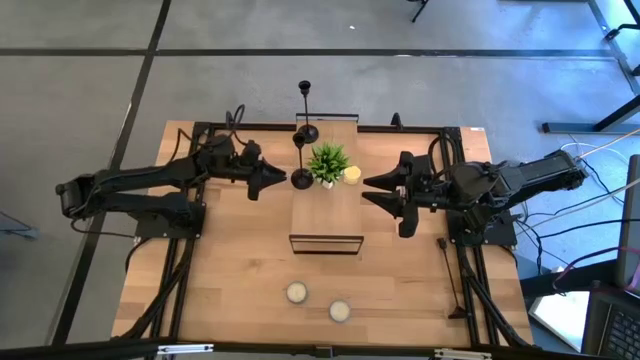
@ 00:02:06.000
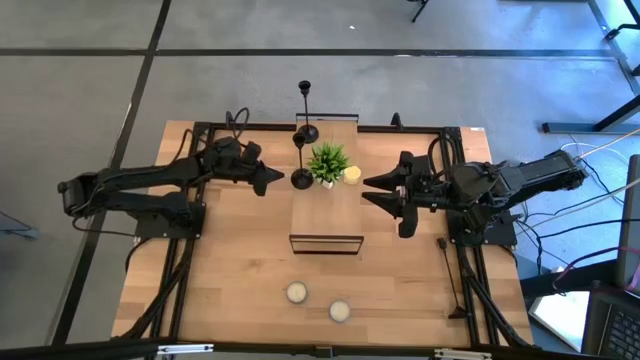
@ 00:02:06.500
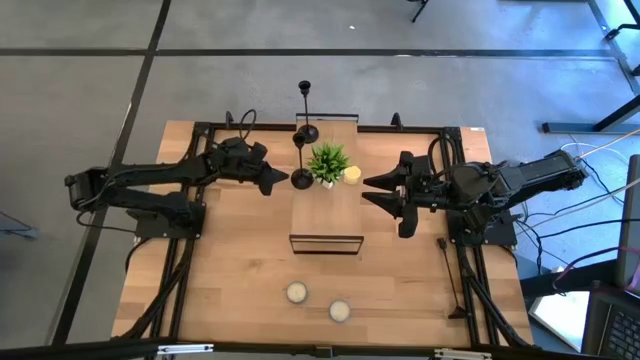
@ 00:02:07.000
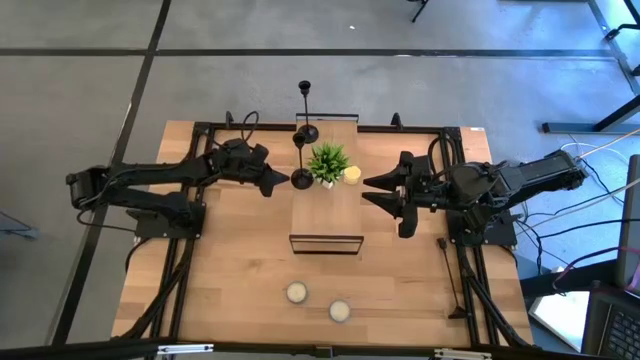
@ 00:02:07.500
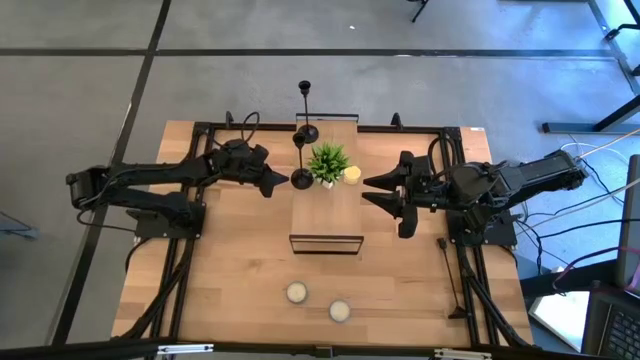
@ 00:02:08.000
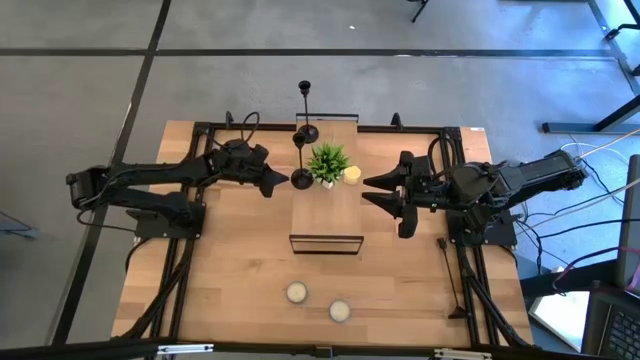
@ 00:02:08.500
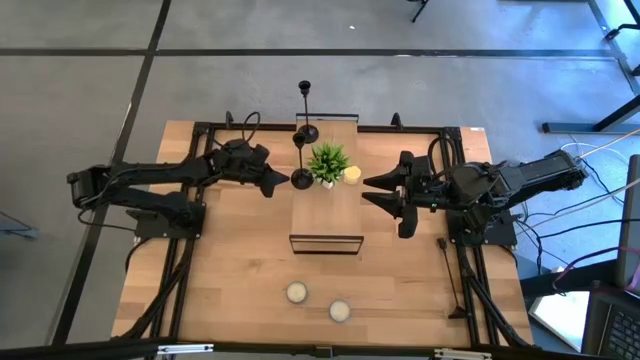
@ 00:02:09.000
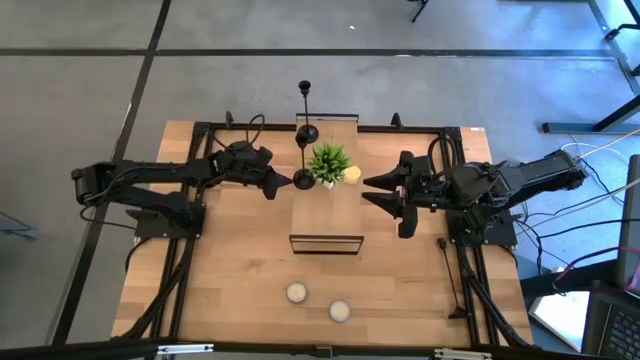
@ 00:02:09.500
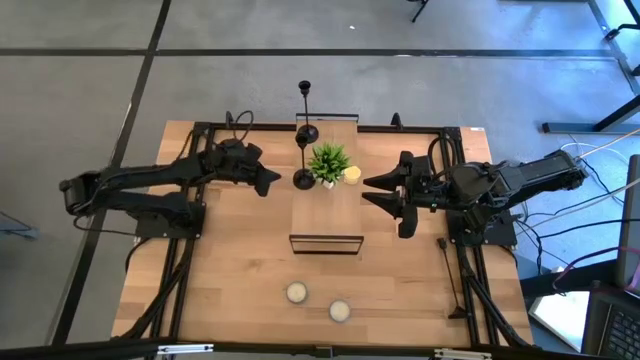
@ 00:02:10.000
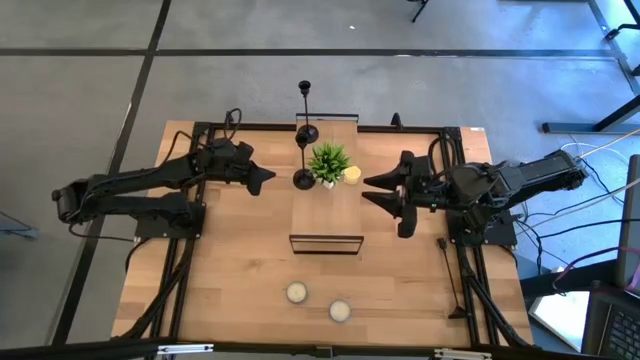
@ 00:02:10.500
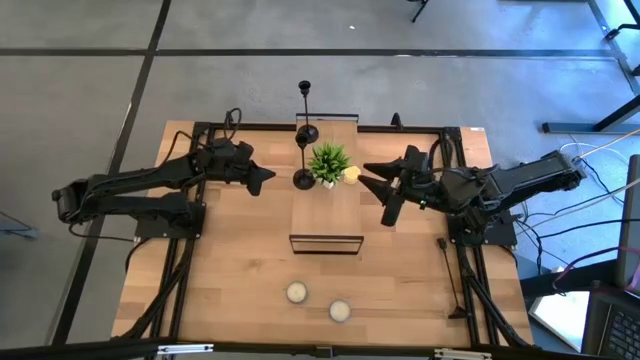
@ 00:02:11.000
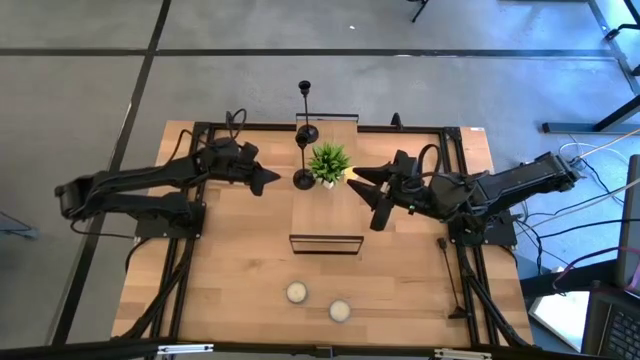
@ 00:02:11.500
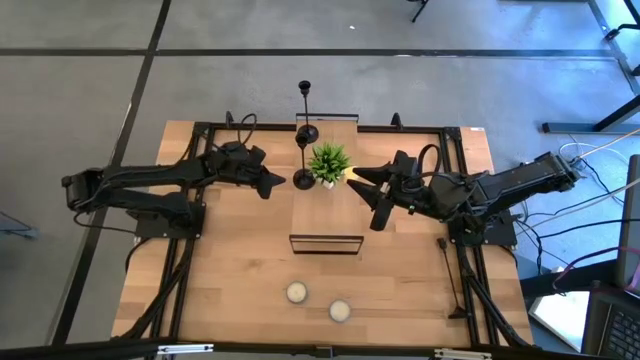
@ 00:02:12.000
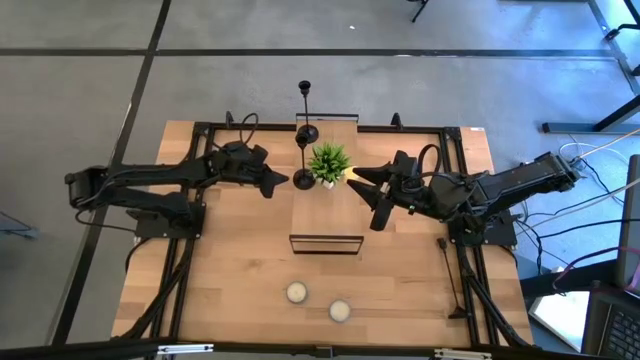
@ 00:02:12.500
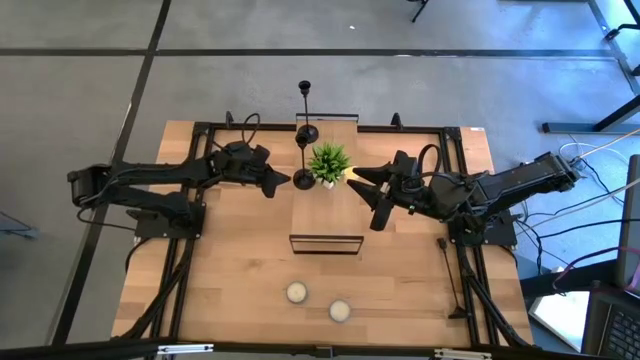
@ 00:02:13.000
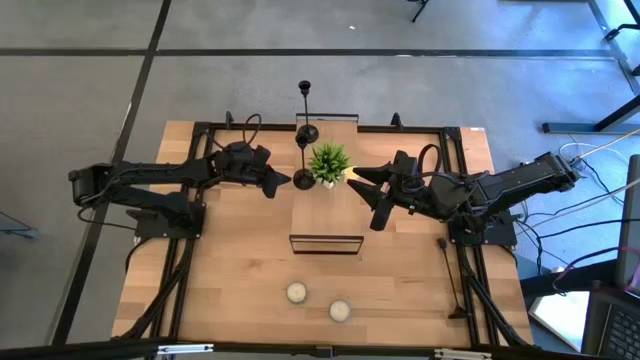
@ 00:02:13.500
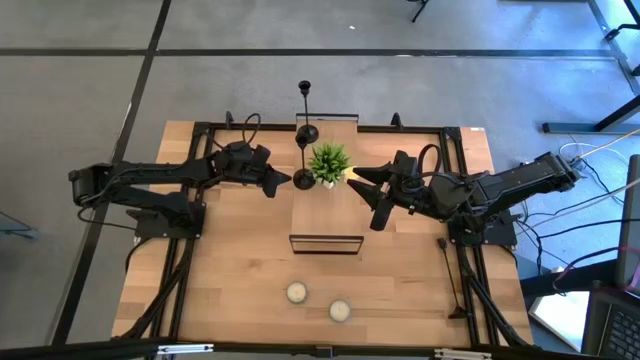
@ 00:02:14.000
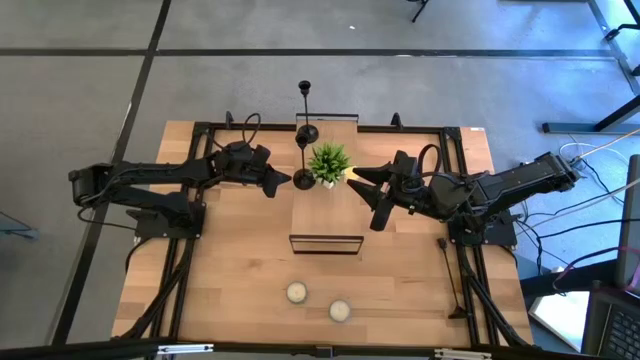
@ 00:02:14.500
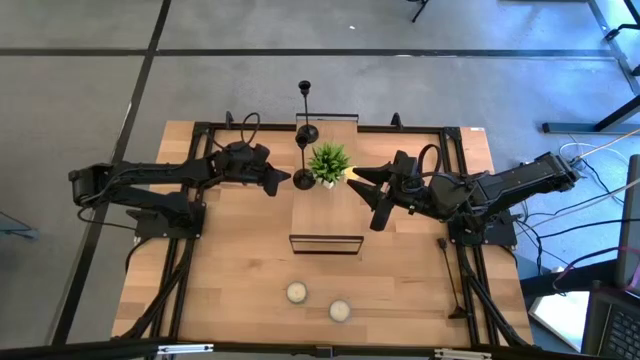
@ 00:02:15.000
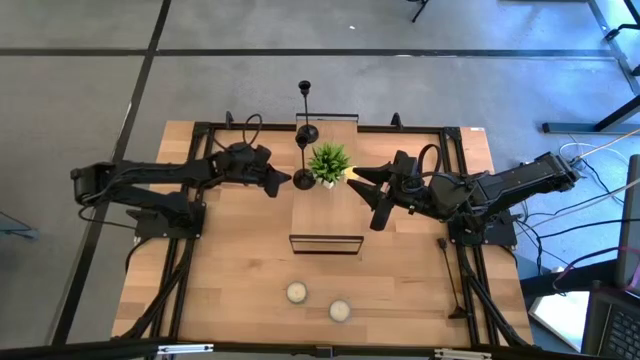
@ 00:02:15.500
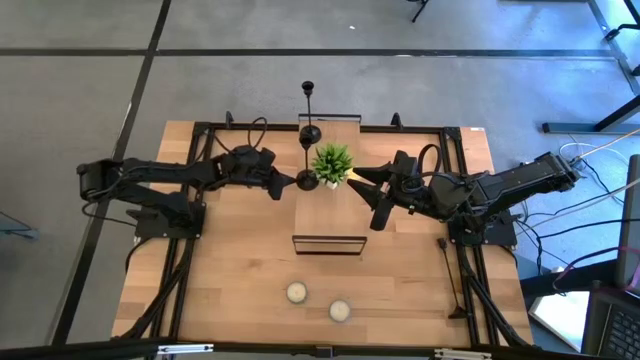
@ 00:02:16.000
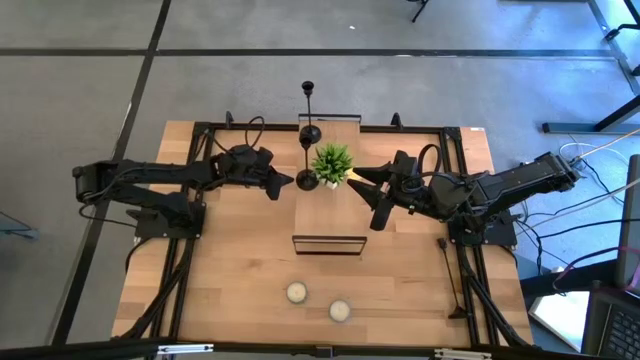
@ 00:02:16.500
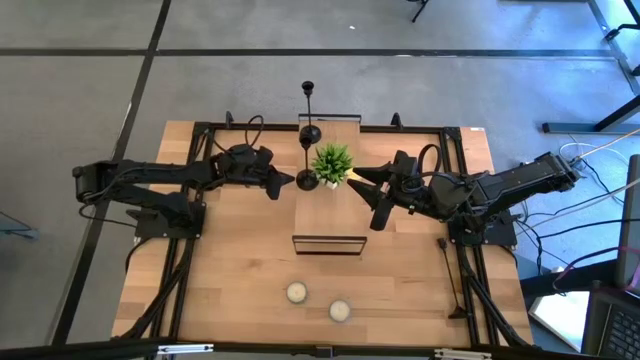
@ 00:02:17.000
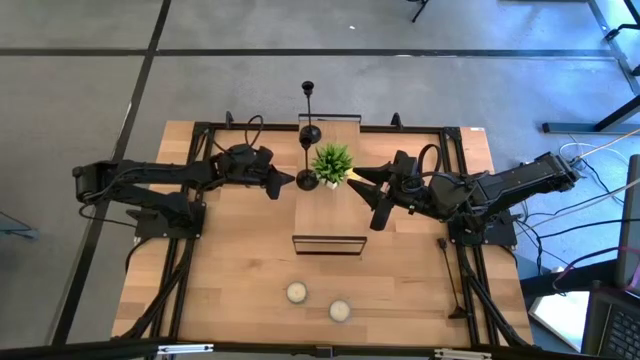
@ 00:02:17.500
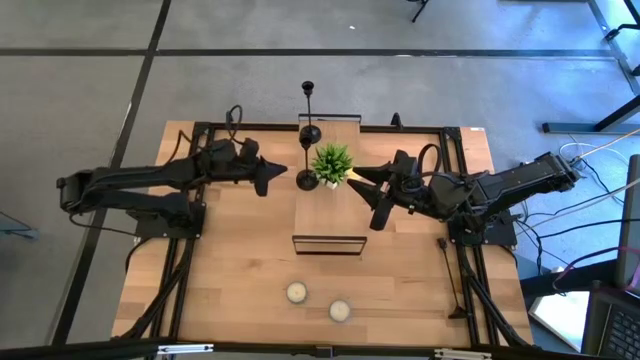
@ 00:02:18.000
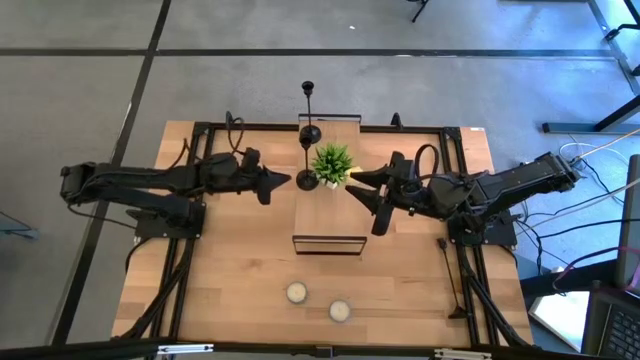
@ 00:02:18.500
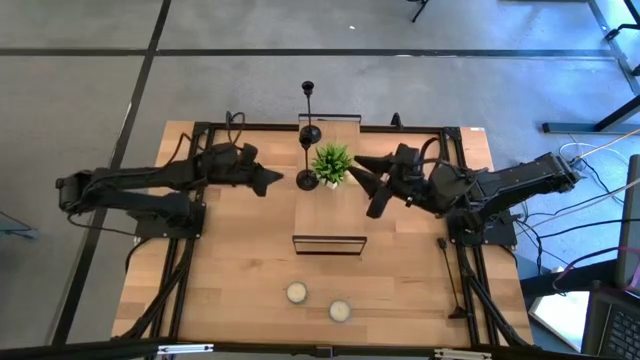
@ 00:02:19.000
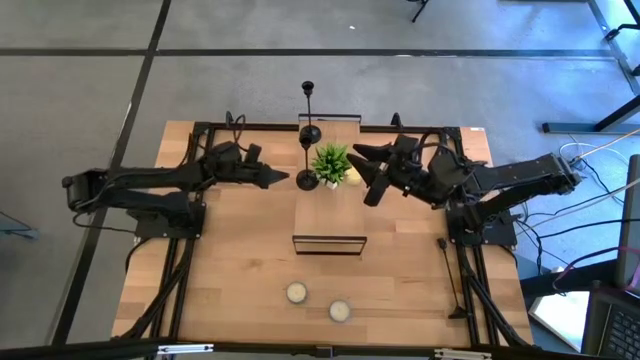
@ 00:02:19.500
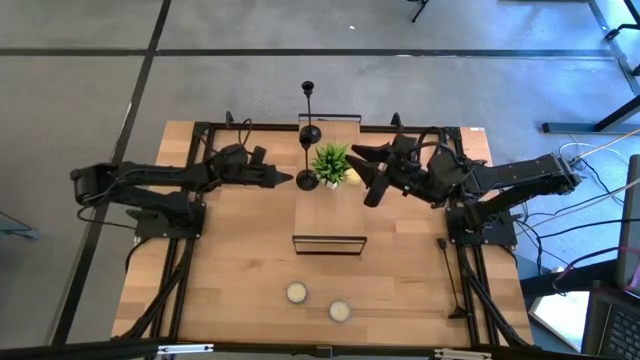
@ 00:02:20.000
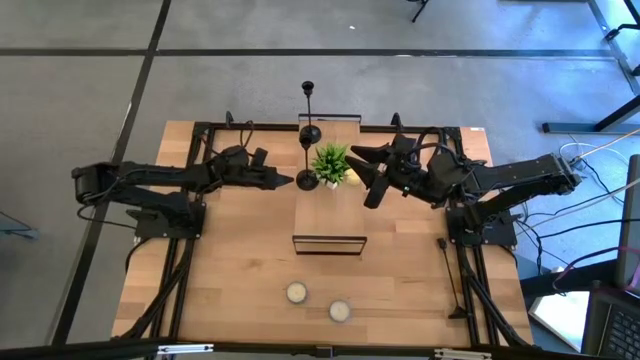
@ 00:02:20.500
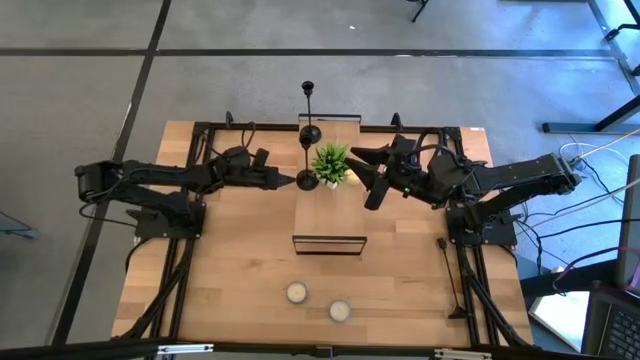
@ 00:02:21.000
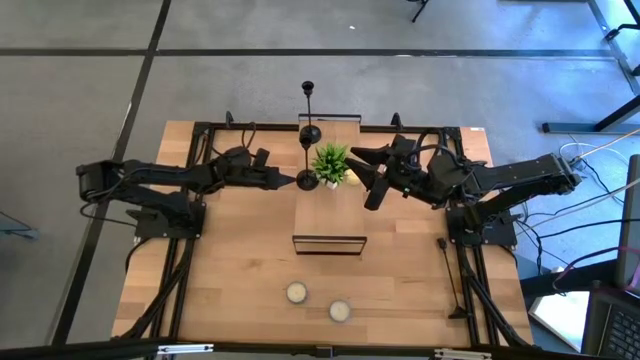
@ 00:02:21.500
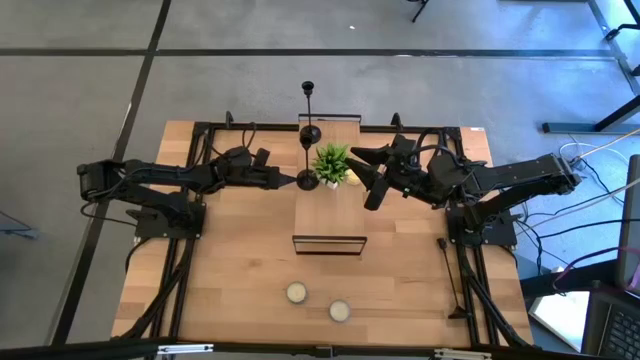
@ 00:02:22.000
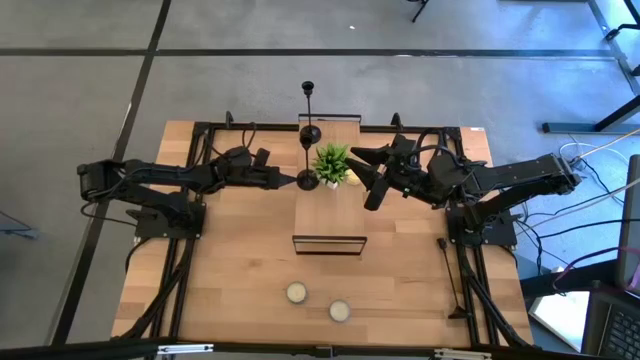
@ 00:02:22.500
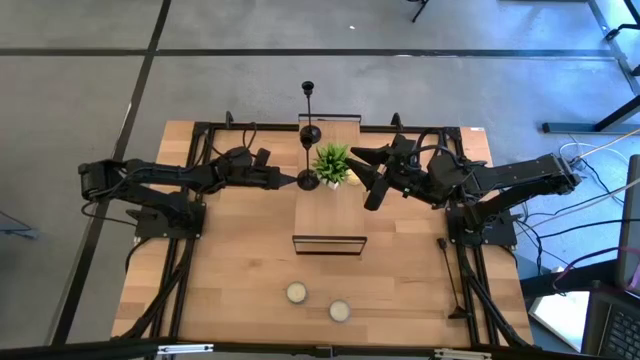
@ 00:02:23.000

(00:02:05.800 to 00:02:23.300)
Task: Pick & Place candle stick holders
Put the left candle holder on the shelf

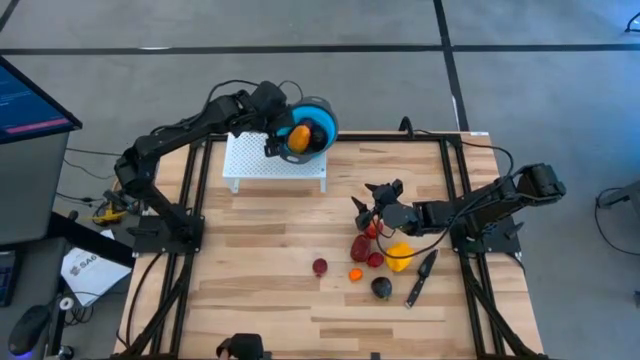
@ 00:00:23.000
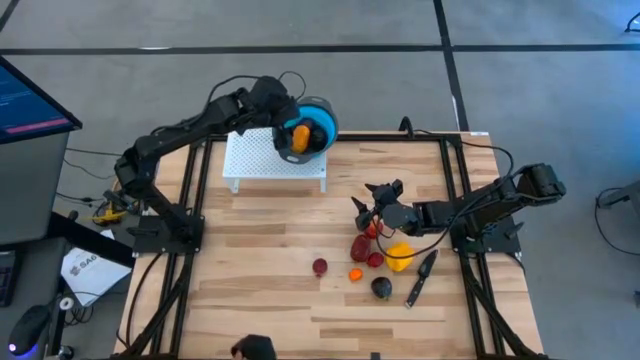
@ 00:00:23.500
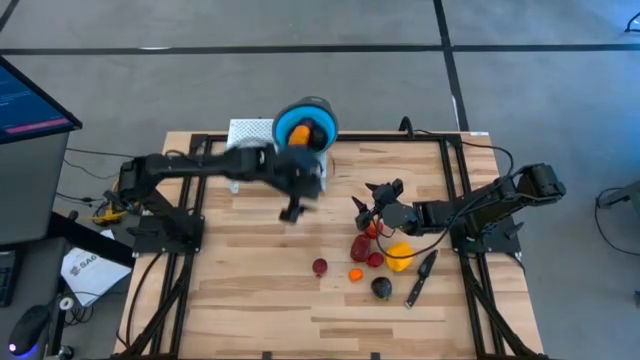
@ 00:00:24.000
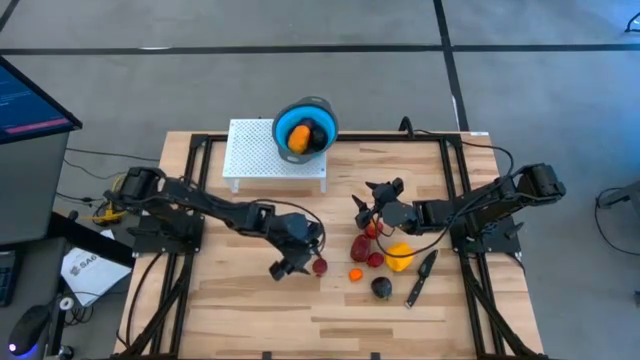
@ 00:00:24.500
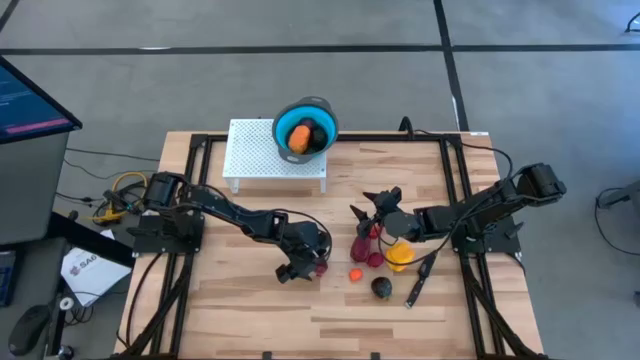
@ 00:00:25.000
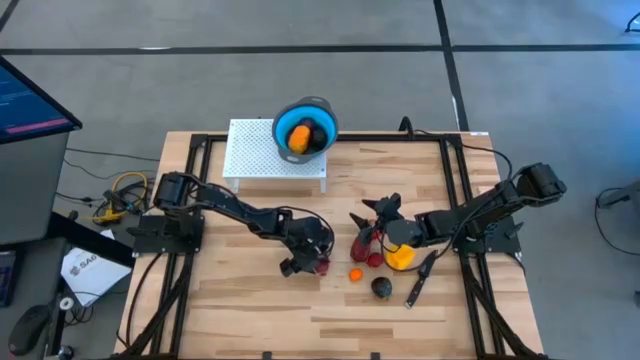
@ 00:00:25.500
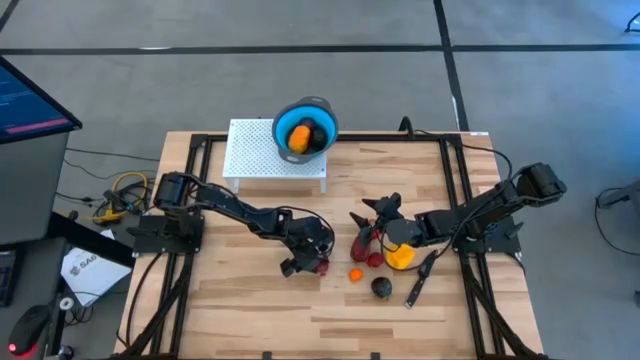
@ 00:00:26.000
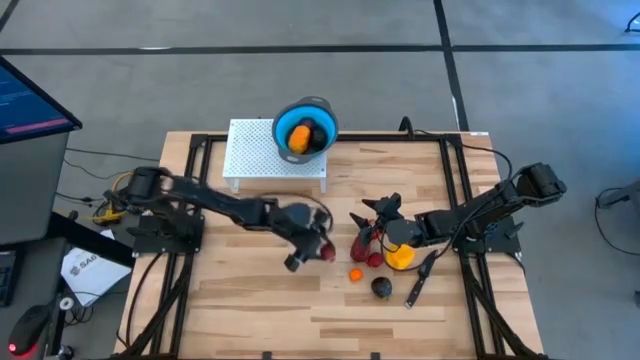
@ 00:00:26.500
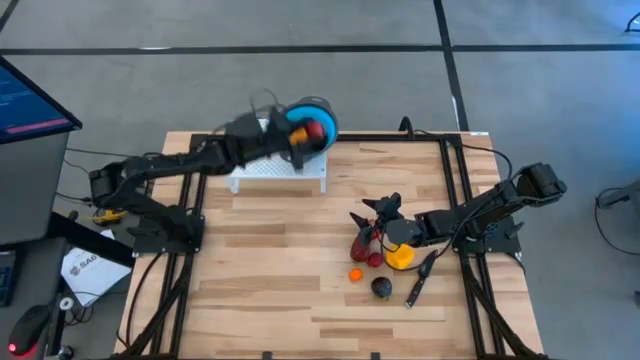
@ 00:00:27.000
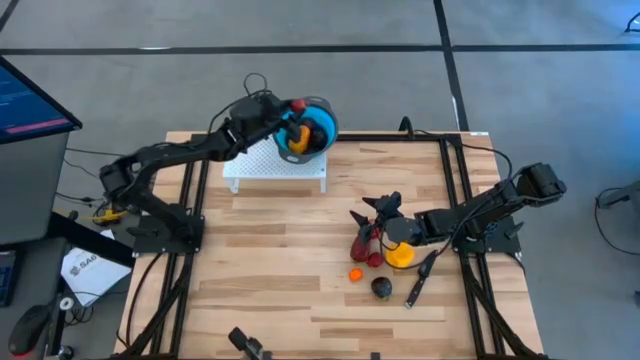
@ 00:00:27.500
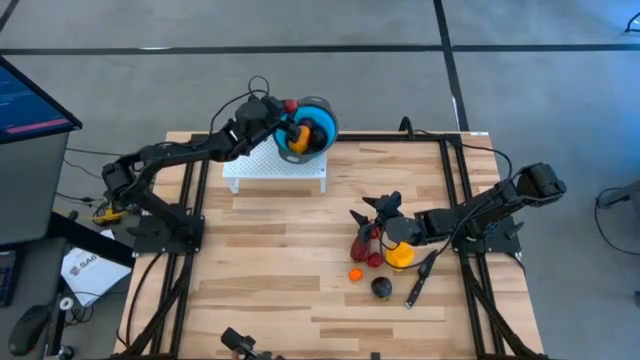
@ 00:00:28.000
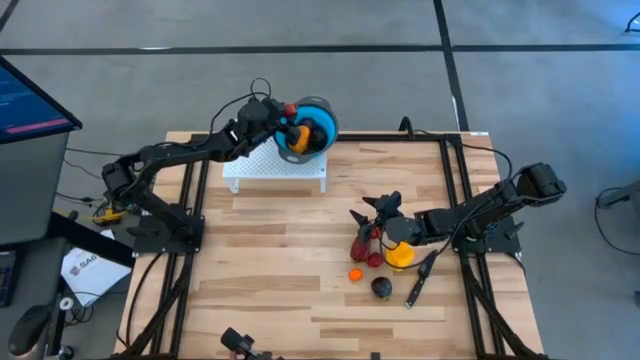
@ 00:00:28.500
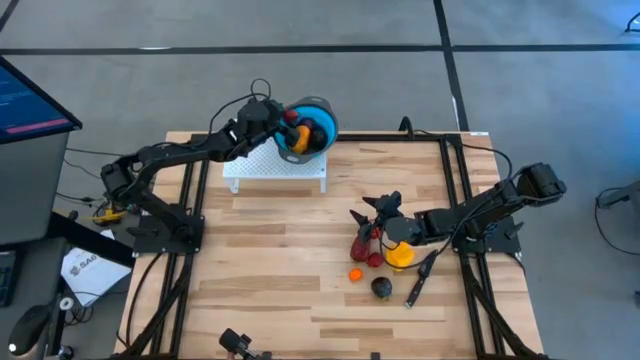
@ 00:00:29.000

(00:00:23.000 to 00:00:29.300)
Task: Pick & Place Fruit
Put the left red pomegranate into the blue strainer bowl
